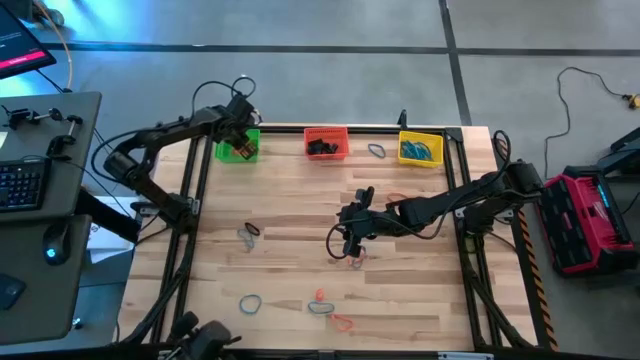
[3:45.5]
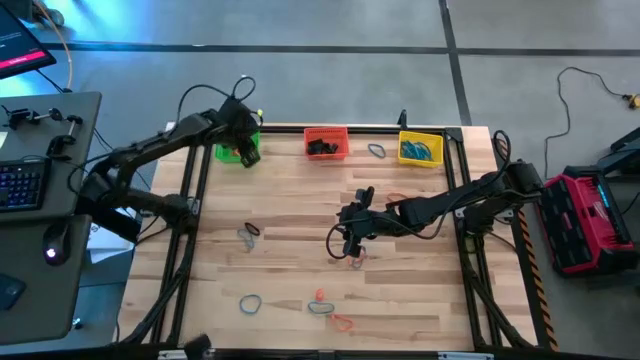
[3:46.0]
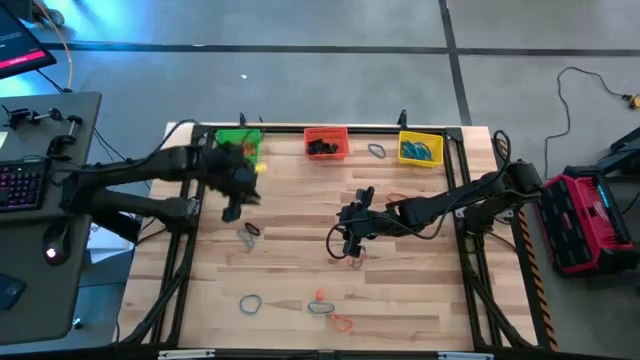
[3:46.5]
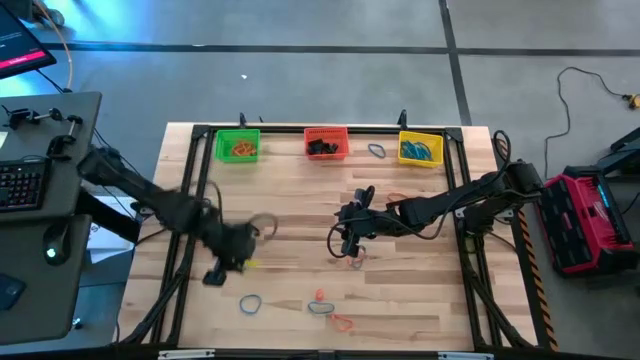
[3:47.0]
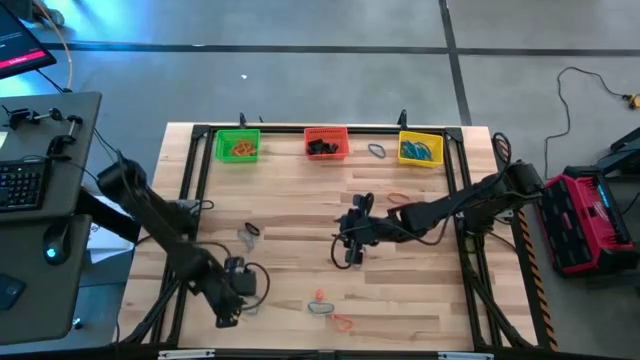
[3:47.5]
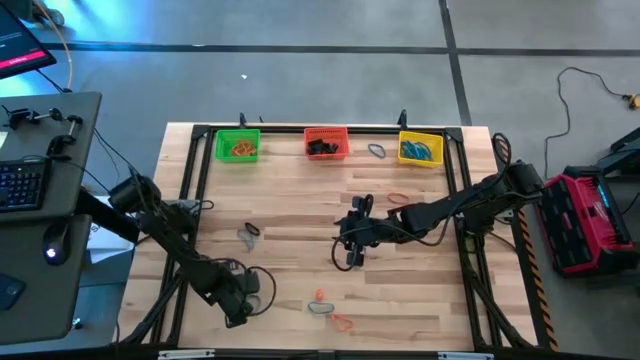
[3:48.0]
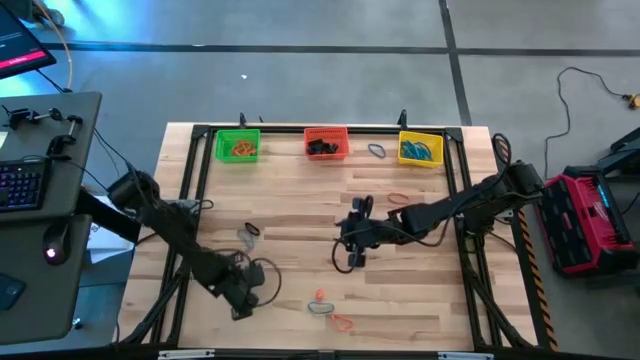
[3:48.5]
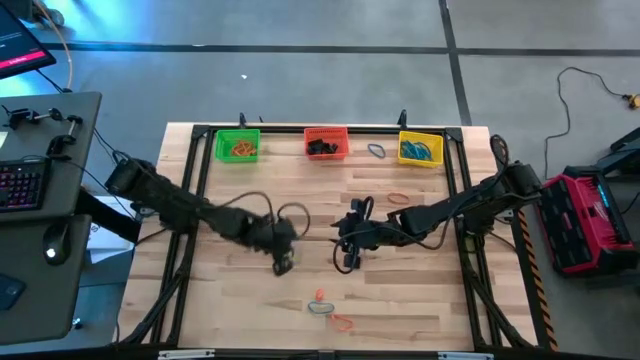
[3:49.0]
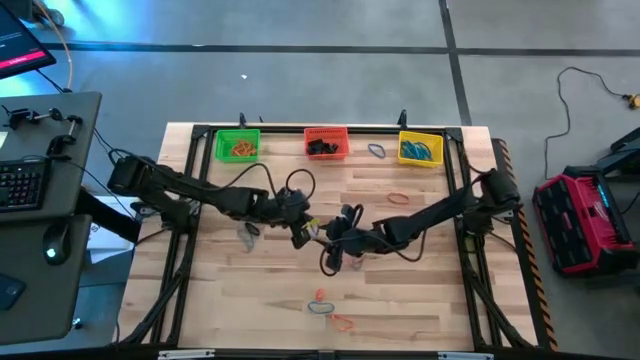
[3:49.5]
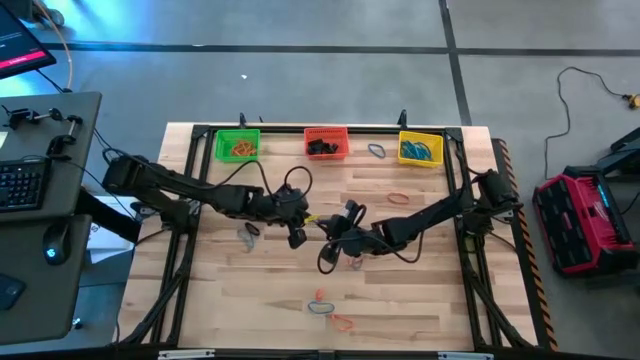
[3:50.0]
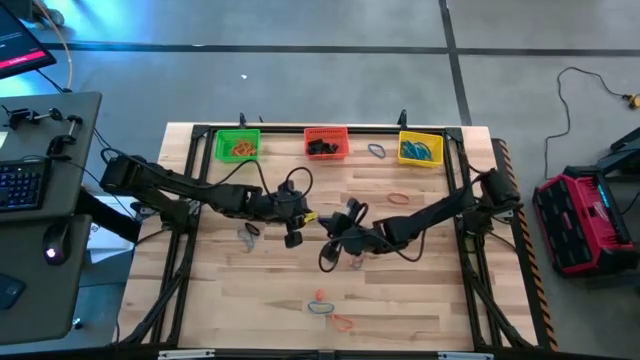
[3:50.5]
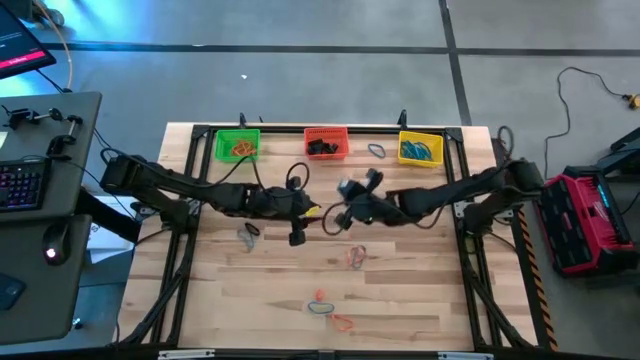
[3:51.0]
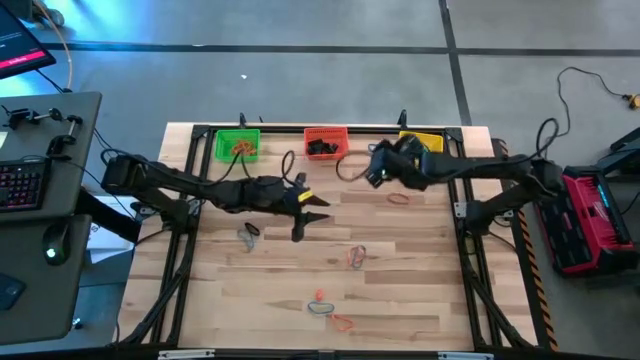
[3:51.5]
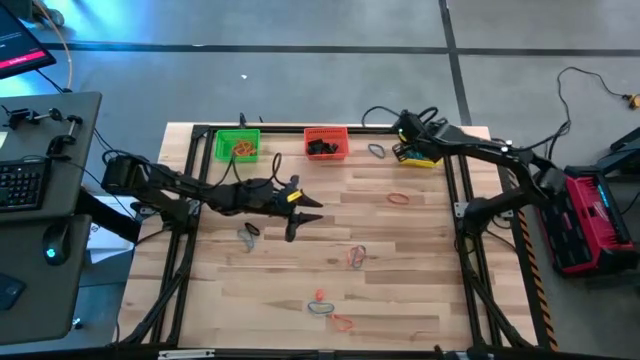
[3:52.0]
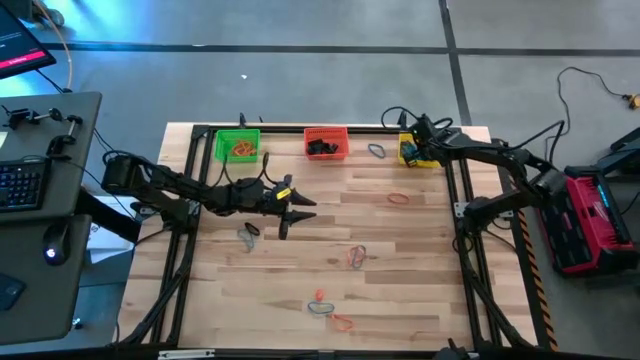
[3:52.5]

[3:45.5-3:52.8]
Task: Sort rubber bands into baskets
Put the blue rubber band into the yellow bin

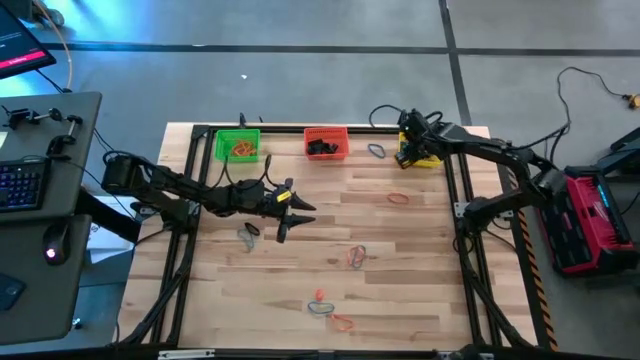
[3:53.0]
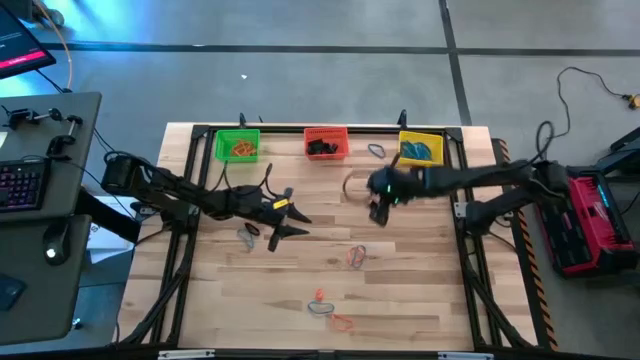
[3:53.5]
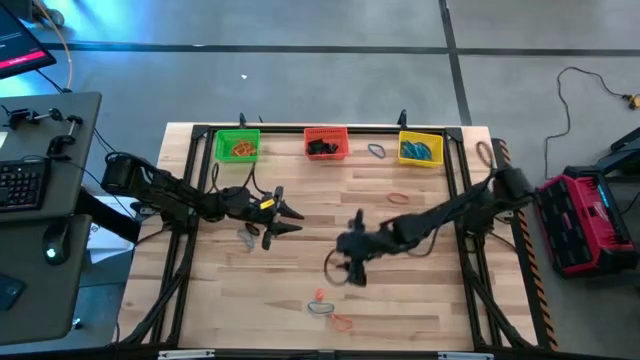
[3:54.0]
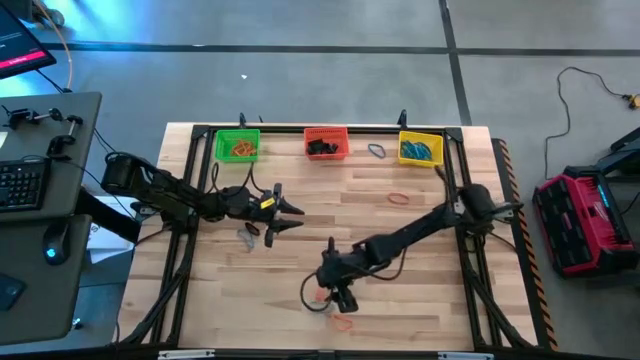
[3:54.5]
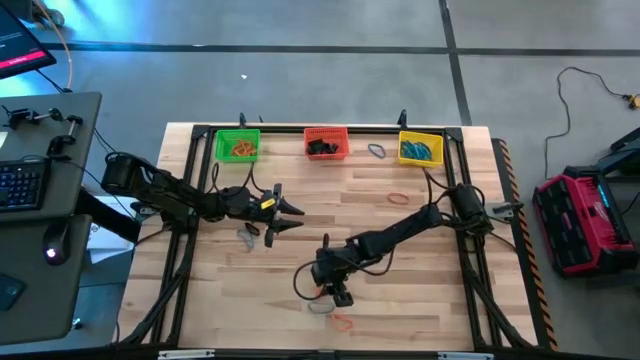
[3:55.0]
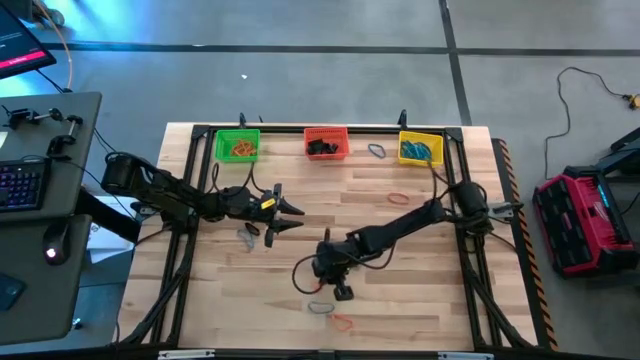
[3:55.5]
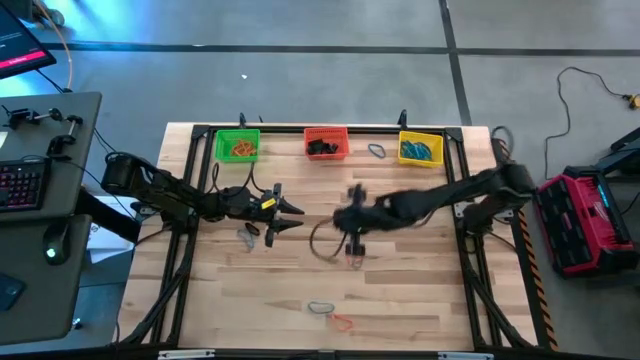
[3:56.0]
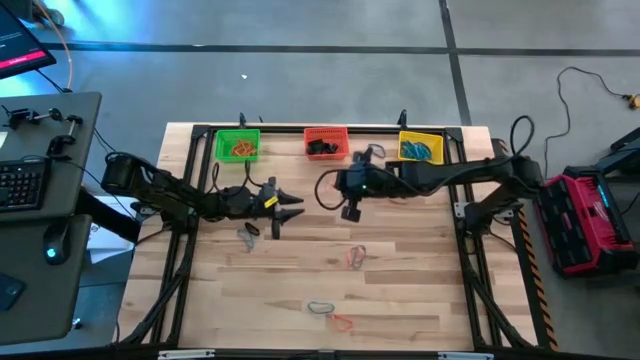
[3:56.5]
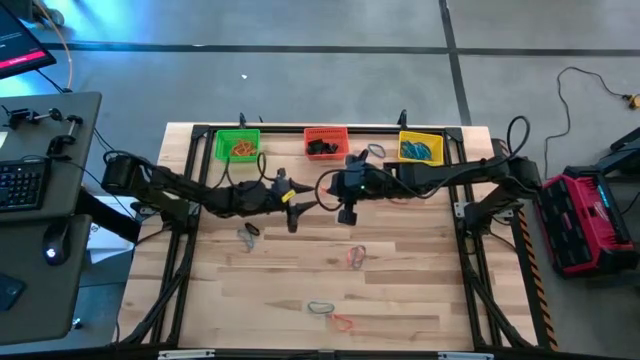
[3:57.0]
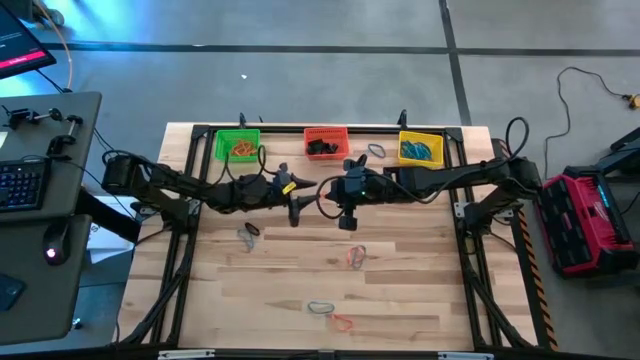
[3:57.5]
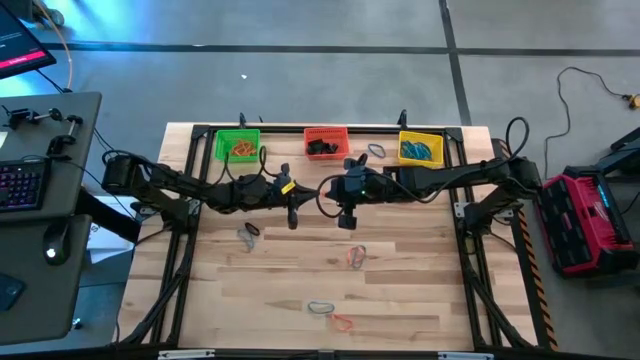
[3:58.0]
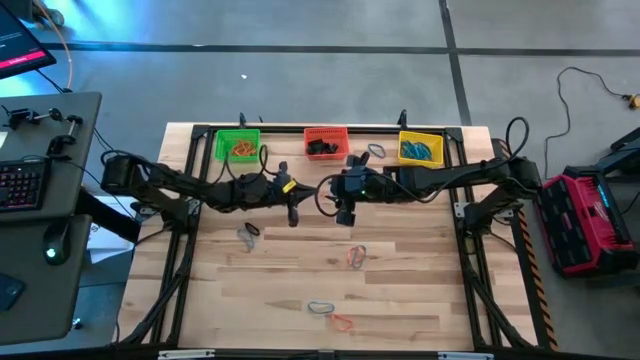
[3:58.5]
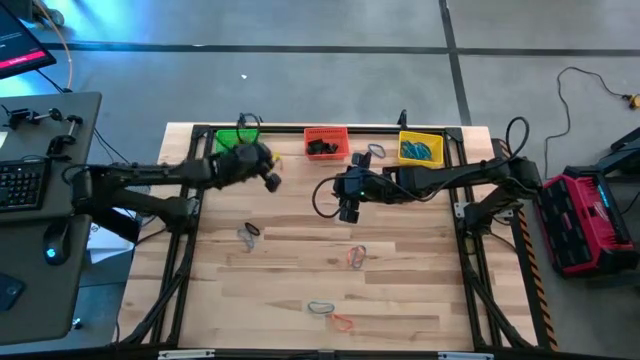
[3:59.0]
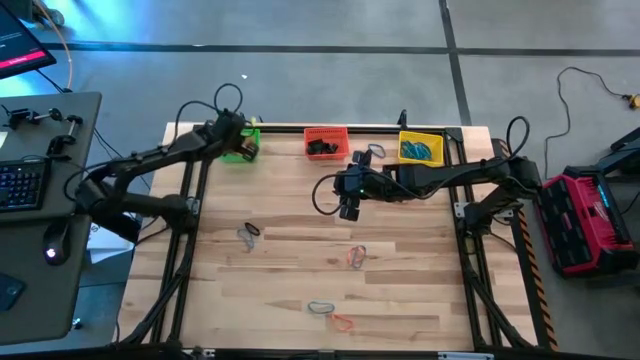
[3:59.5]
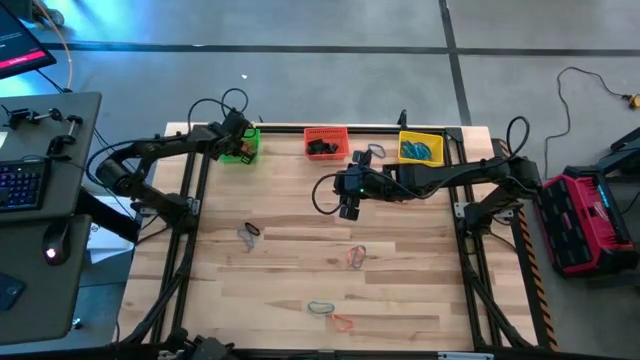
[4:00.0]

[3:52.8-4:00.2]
Put the orange rubber band into the green bin

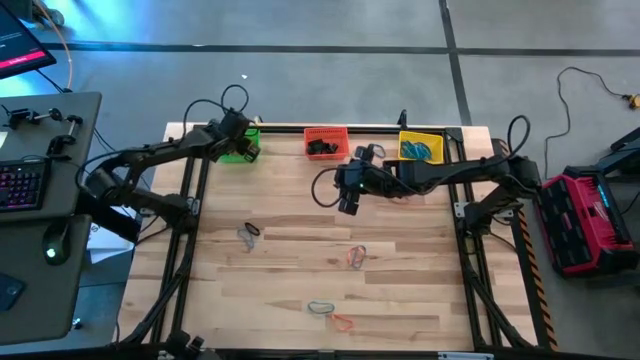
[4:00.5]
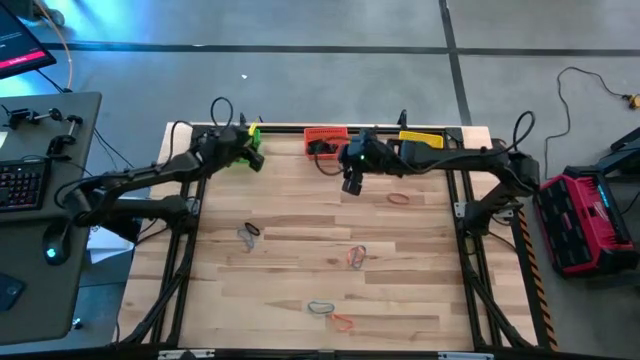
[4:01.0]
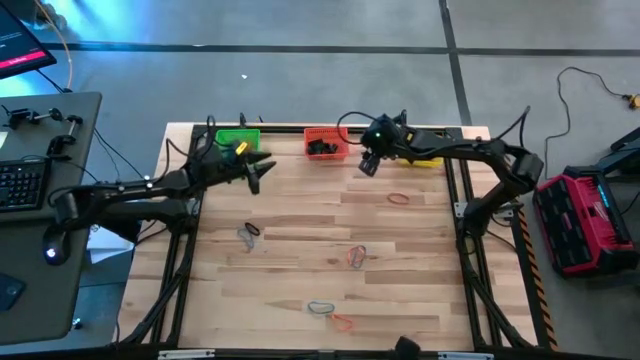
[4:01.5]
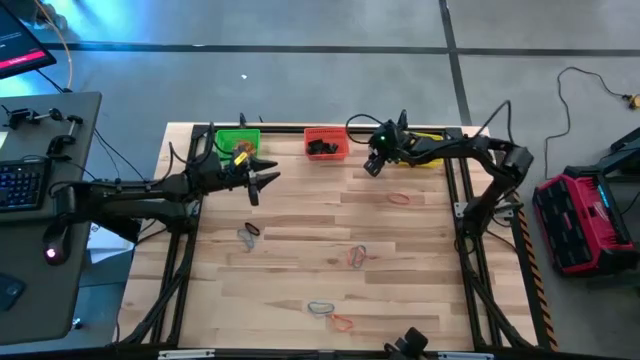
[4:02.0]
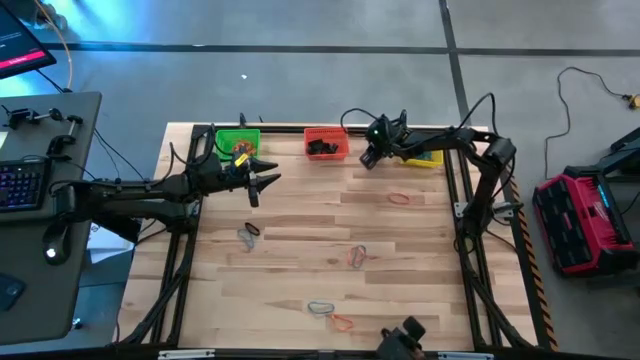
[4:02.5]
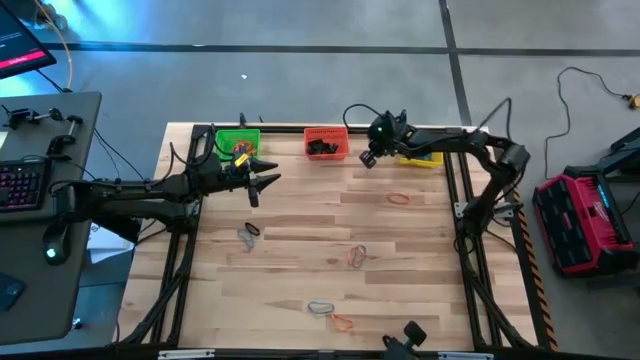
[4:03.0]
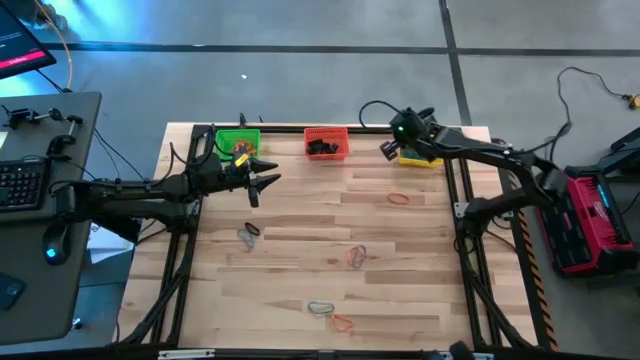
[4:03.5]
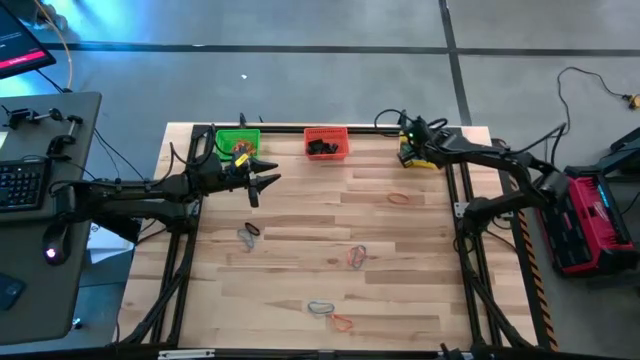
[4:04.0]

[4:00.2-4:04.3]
Put the blue rubber band into the yellow bin

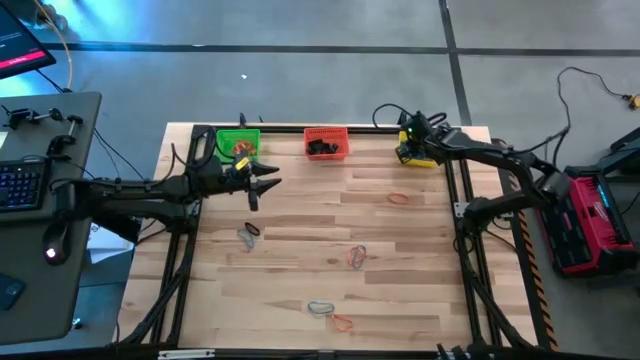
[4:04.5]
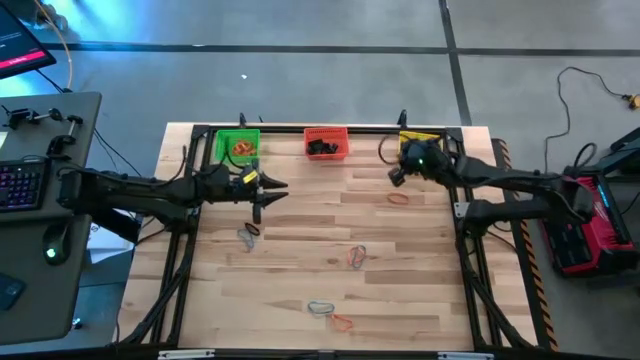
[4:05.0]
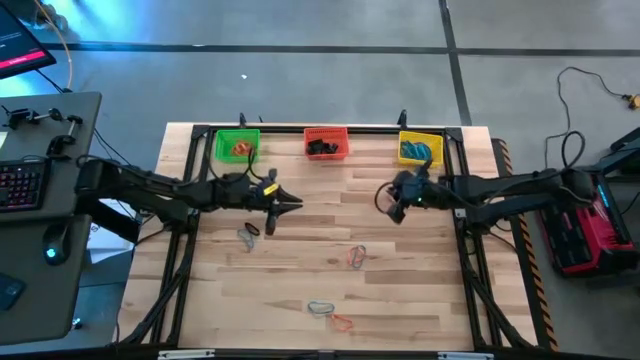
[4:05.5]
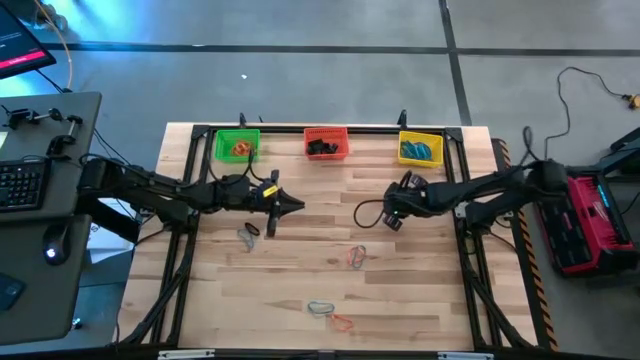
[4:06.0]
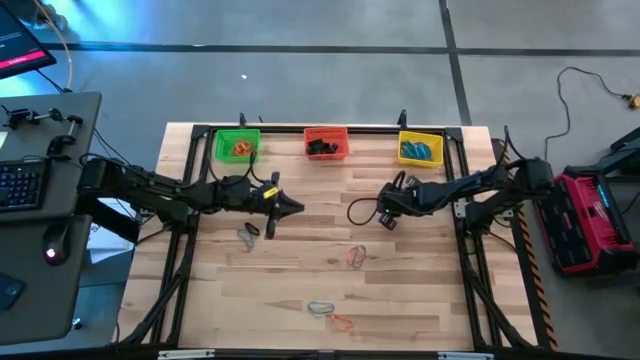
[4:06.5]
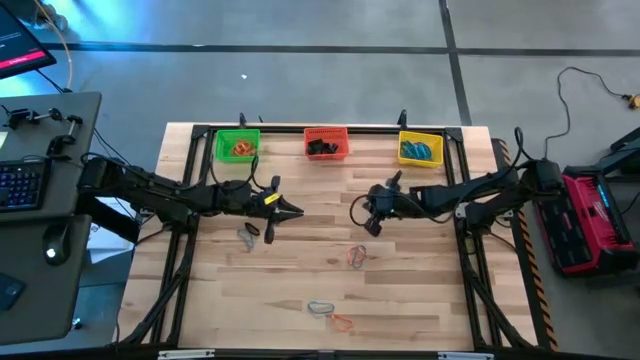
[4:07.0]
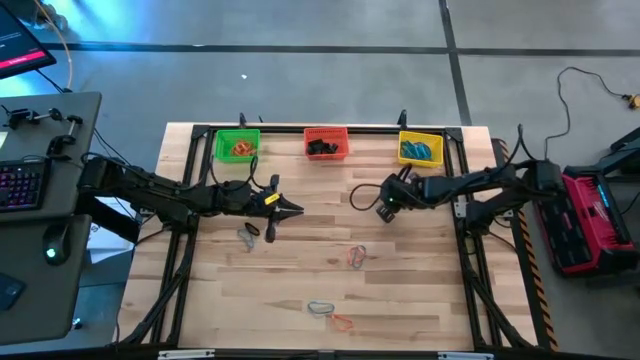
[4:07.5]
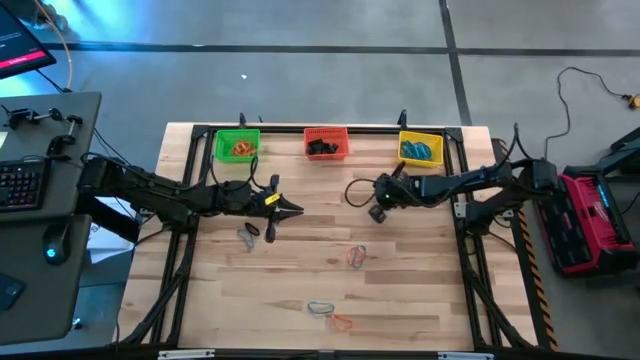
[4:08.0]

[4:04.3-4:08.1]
Put the orange rubber band into the green bin
